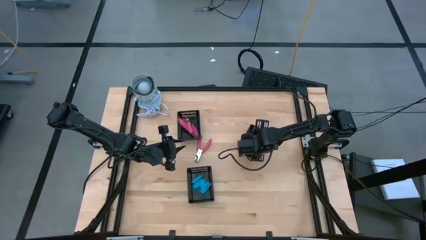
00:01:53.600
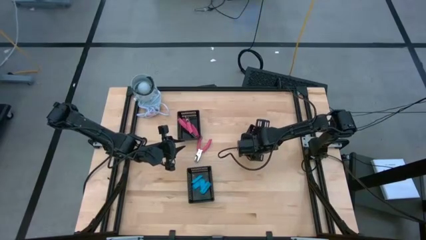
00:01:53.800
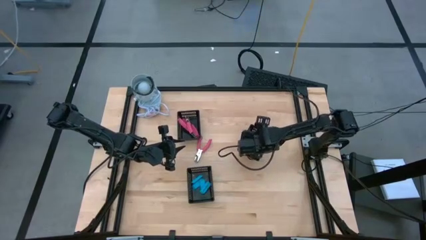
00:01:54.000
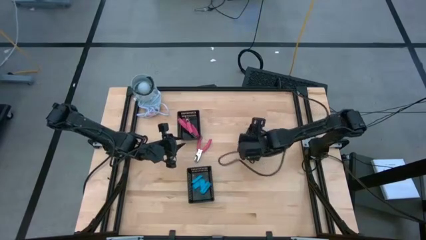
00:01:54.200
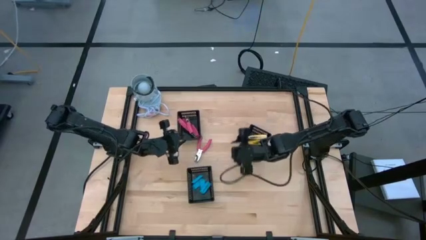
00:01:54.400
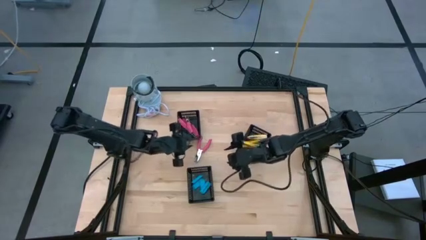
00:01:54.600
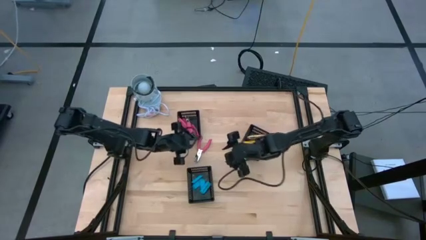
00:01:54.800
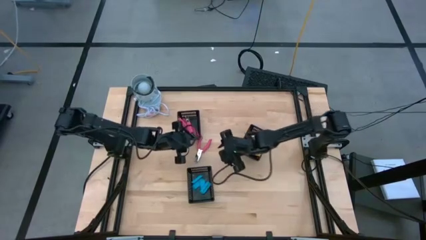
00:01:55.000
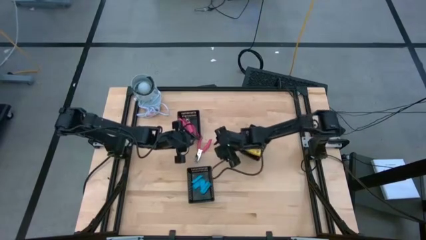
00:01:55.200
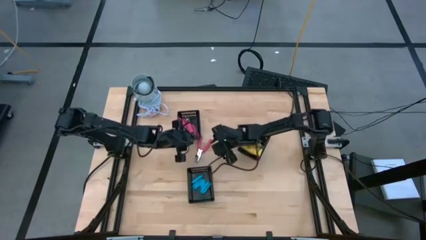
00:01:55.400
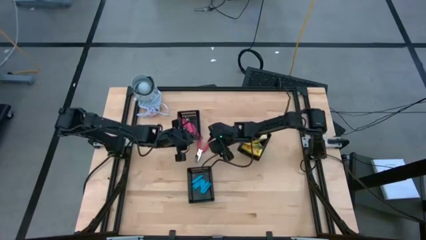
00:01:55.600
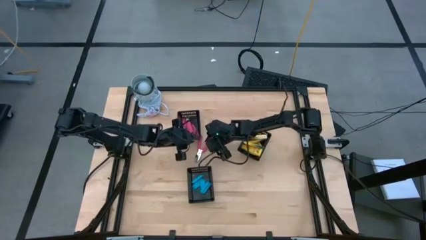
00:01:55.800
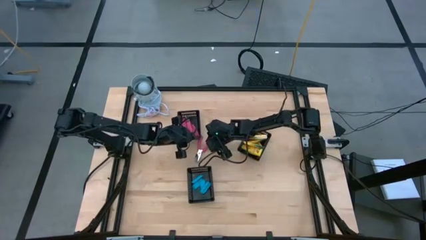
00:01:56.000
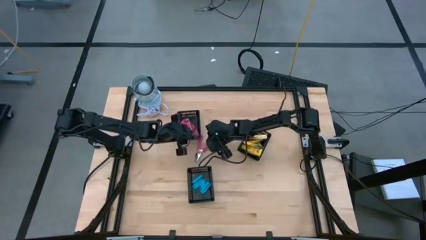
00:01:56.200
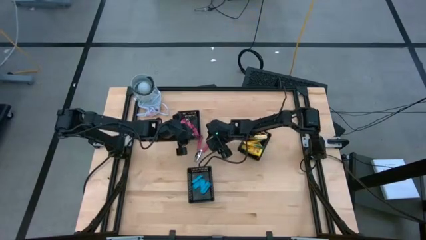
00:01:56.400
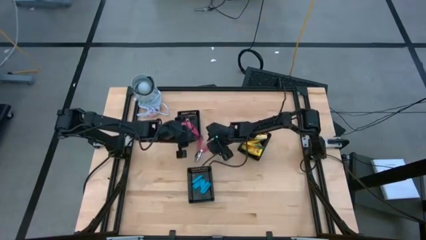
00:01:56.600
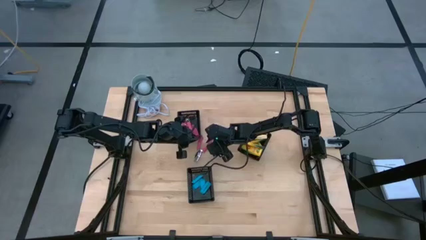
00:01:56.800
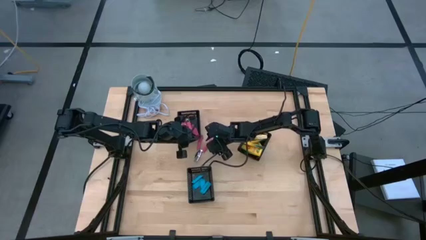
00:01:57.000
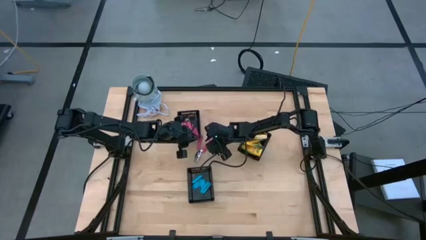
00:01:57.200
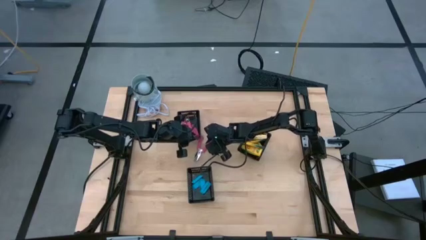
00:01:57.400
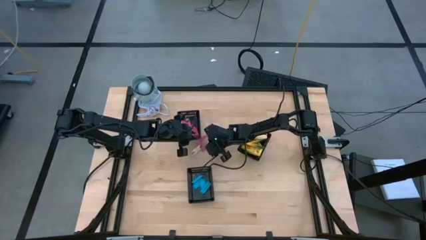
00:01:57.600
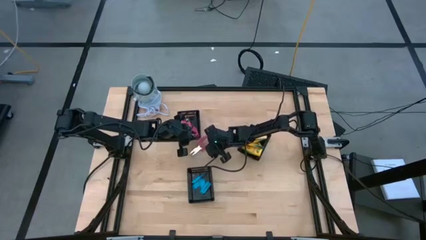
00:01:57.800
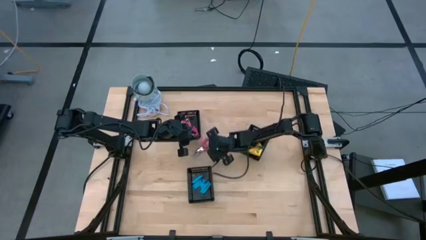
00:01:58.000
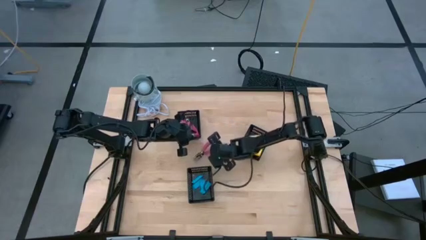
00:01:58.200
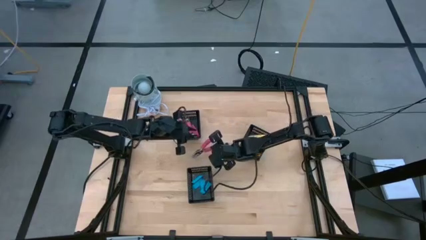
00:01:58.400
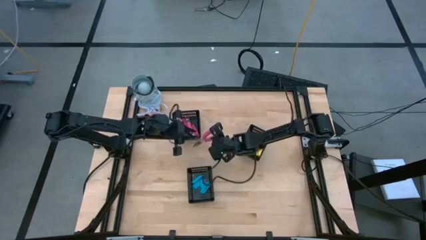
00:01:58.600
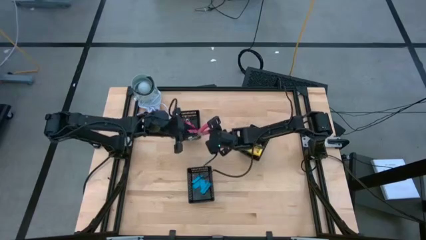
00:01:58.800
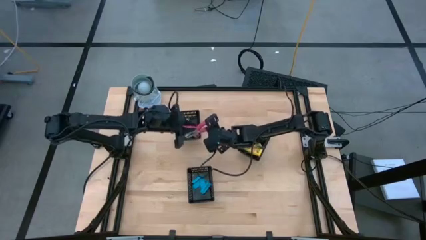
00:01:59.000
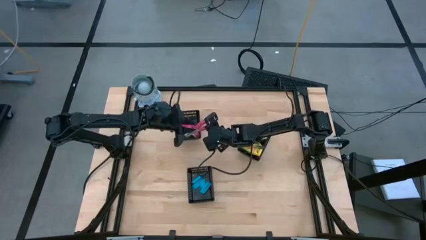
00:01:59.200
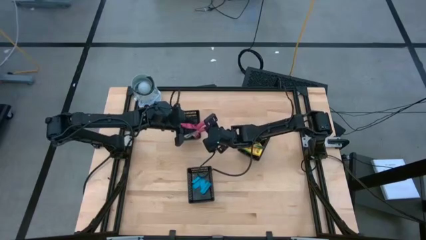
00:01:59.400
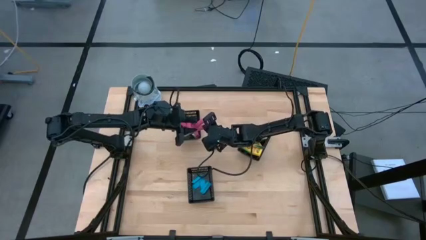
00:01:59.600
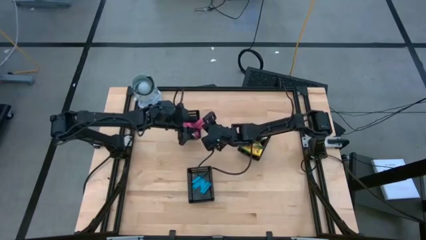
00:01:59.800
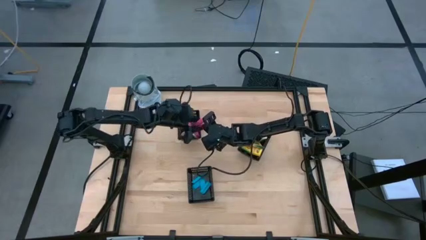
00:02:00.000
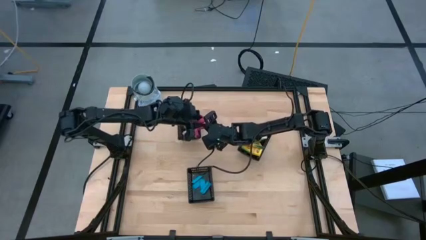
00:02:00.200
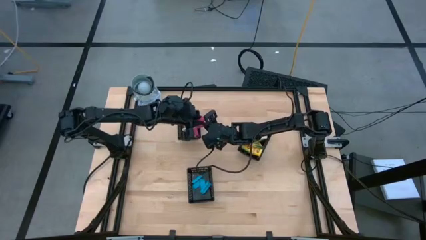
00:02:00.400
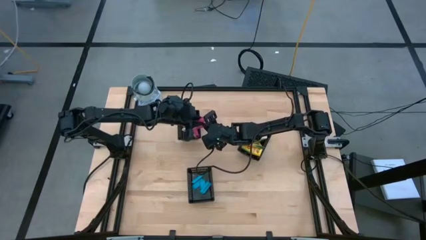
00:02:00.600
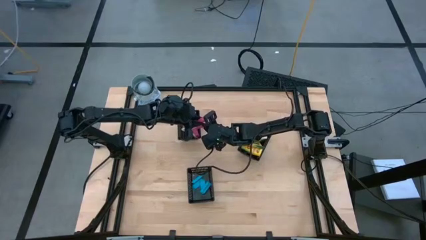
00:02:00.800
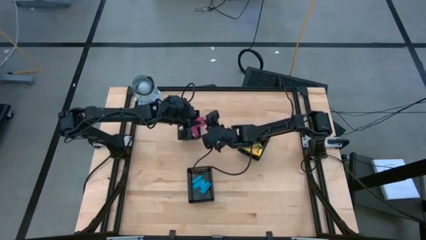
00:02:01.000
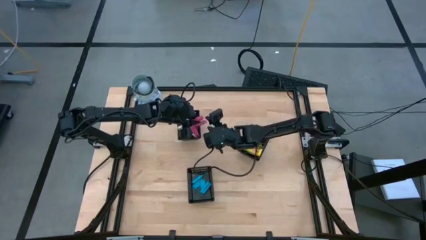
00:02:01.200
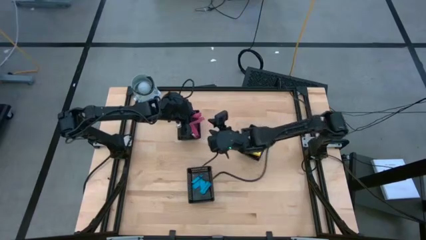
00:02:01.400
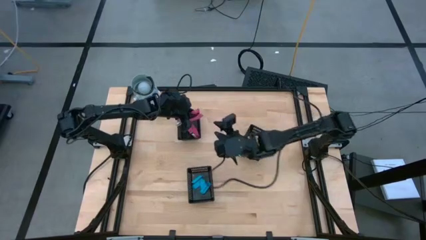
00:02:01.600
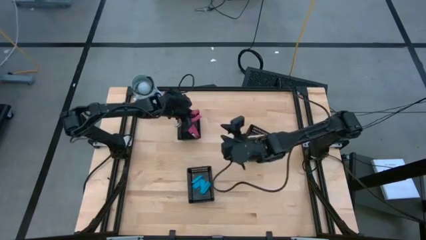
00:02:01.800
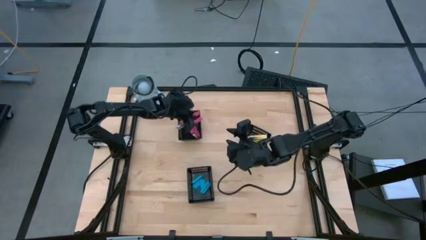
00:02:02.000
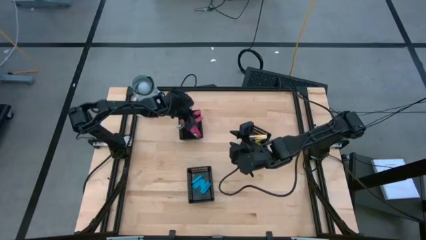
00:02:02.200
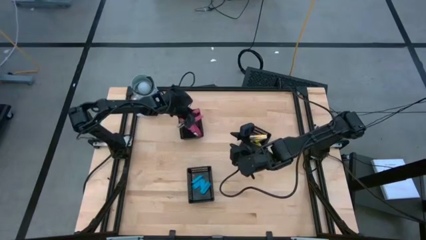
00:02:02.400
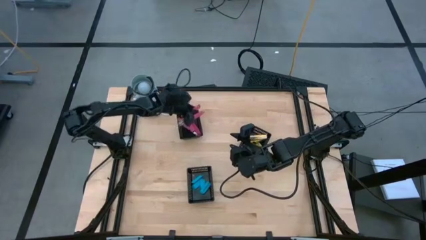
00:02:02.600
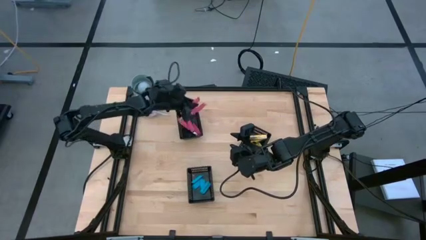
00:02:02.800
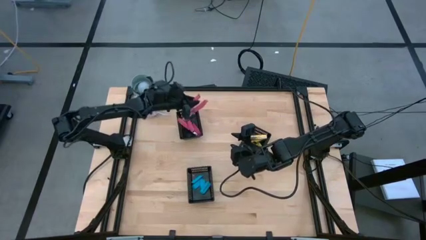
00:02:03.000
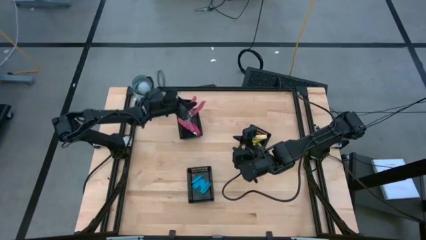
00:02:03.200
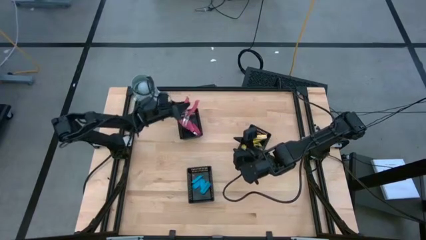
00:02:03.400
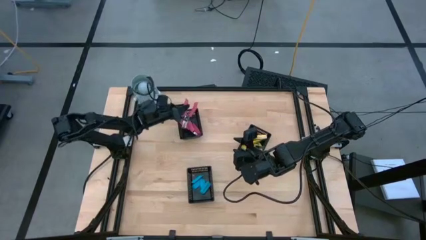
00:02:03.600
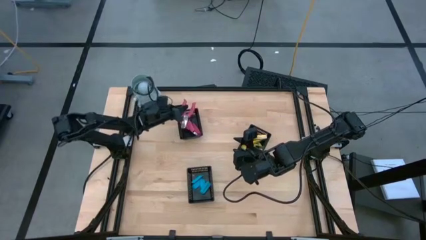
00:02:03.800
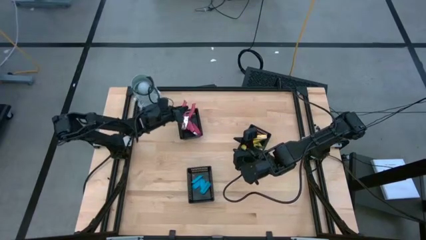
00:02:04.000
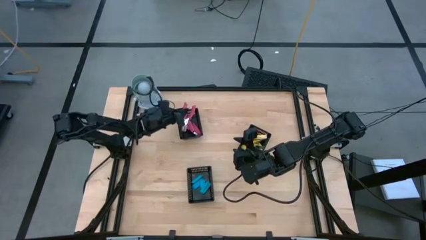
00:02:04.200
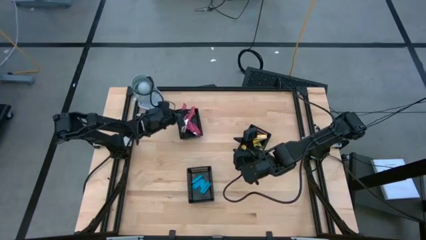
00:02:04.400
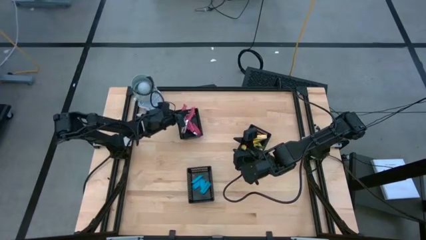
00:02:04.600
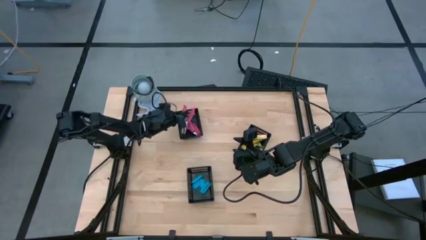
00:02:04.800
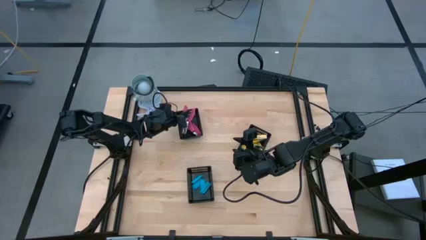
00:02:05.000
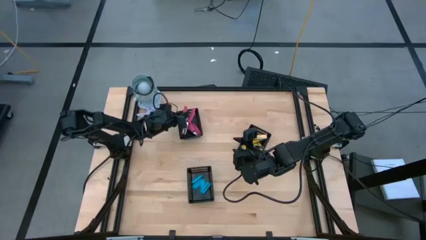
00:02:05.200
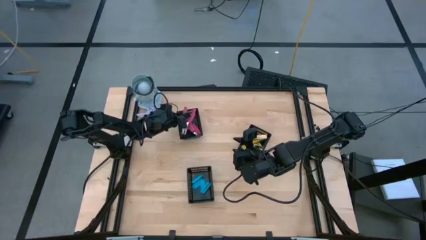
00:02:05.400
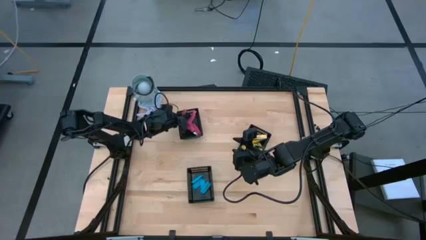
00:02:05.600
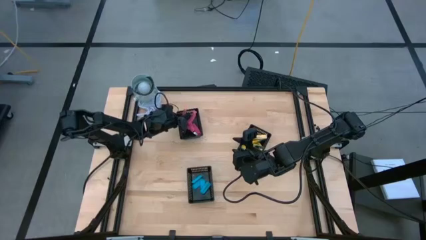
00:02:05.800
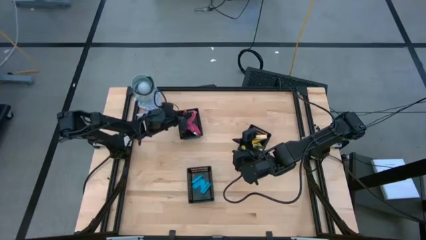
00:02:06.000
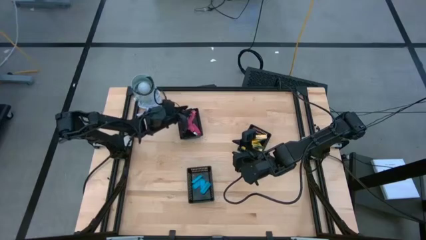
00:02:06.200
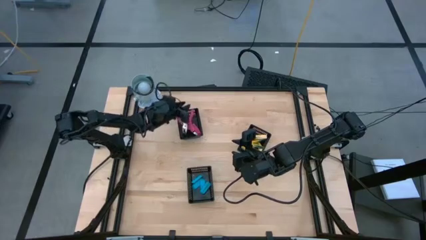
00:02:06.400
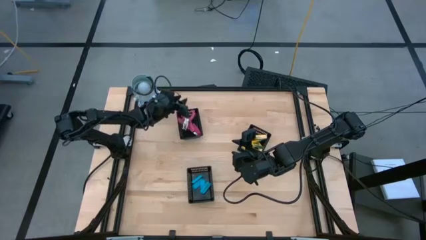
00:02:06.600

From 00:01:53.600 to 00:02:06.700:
Task: Pick & Place School Supplies
Put the pink puncher into the top left black basket

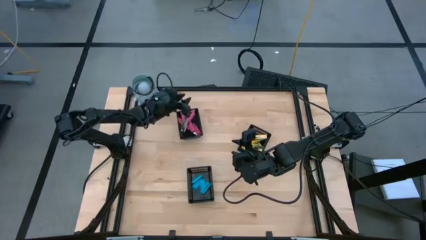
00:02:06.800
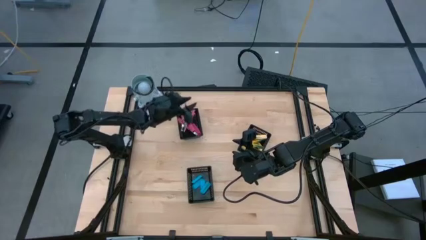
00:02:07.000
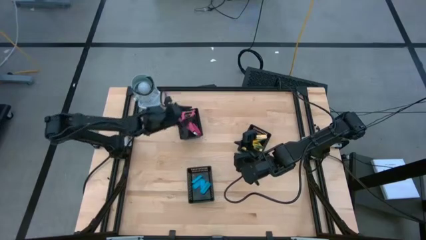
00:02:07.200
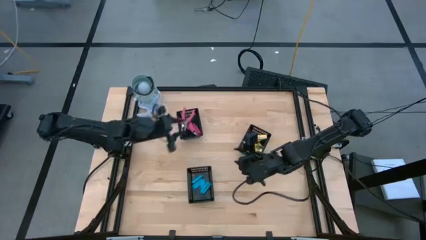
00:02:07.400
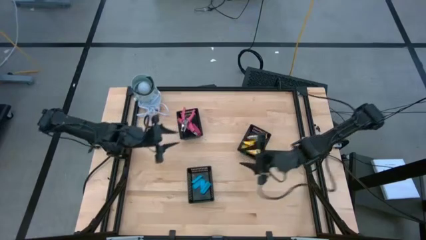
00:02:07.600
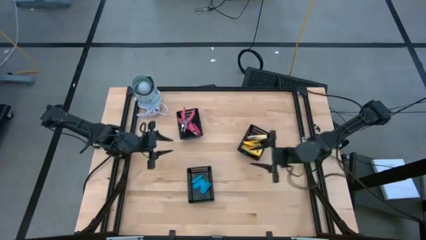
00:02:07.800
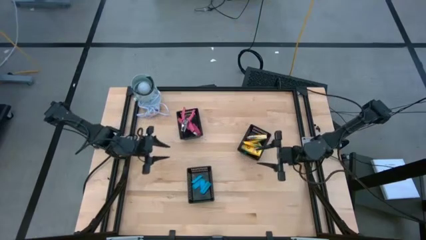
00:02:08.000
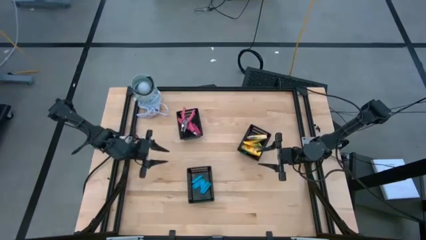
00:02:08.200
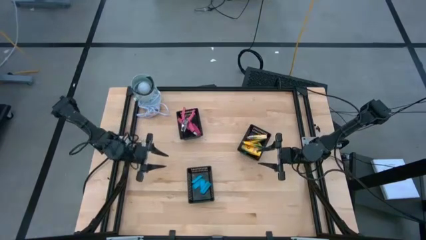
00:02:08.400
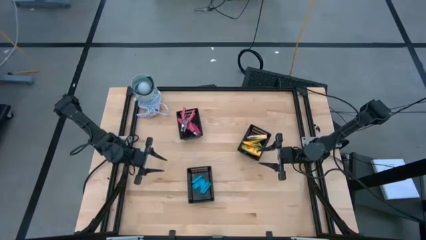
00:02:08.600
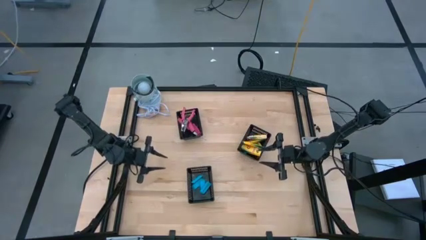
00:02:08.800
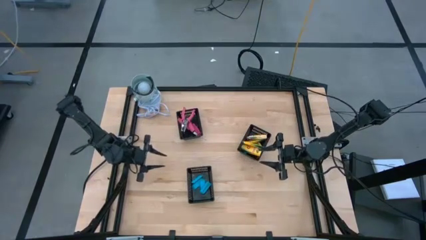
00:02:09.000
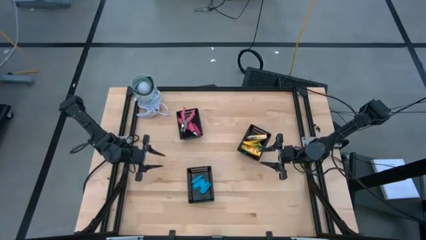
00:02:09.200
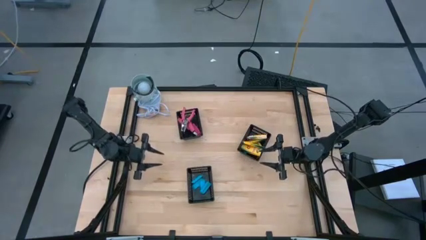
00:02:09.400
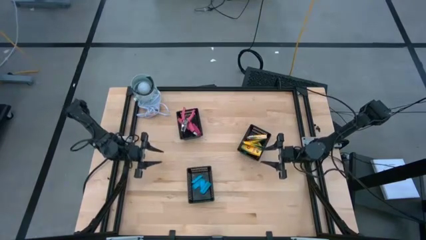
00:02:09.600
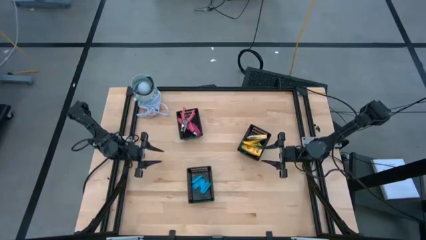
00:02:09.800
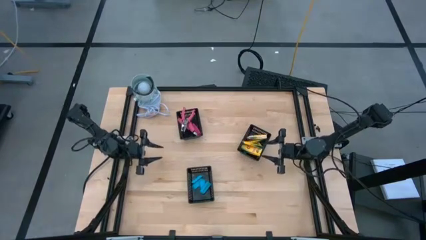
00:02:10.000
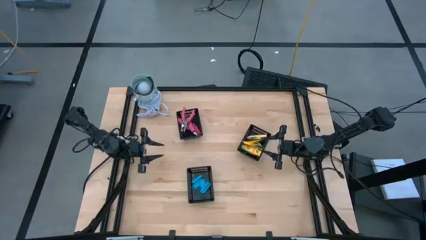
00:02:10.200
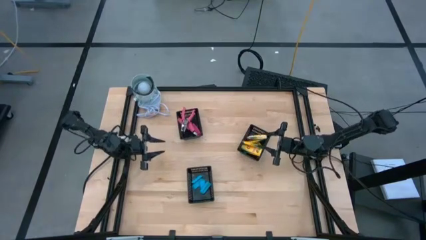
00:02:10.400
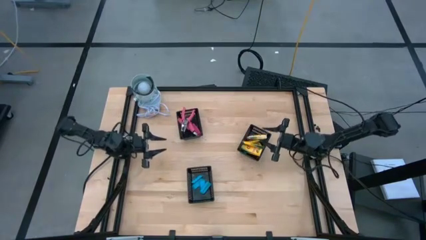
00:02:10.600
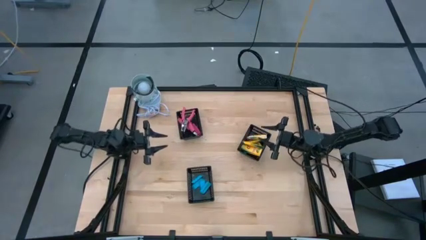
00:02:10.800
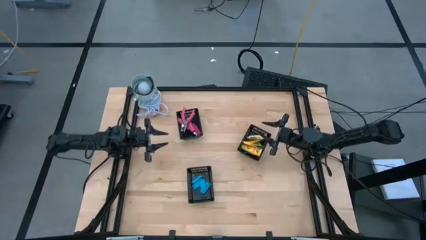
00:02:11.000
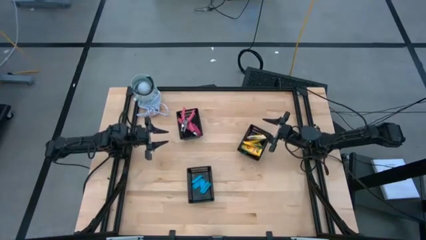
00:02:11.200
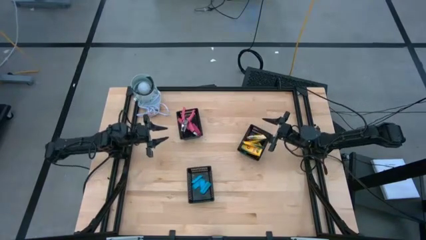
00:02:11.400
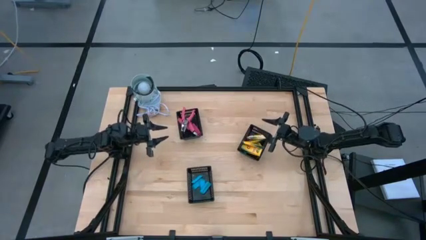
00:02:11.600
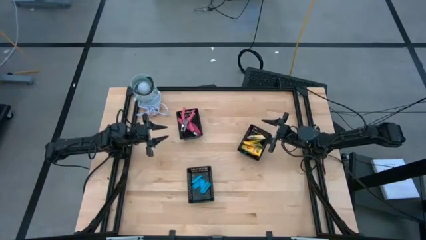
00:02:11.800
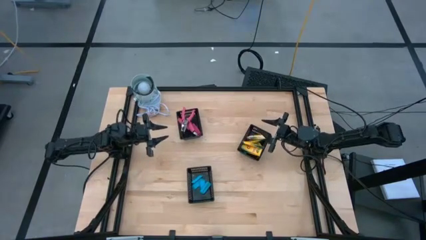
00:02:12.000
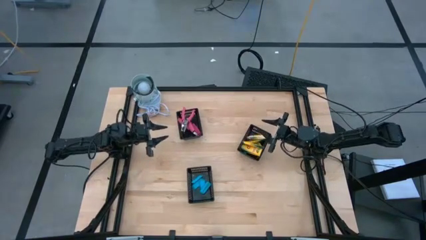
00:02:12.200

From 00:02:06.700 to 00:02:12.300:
Return to Home Position
